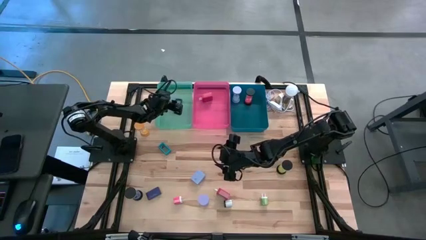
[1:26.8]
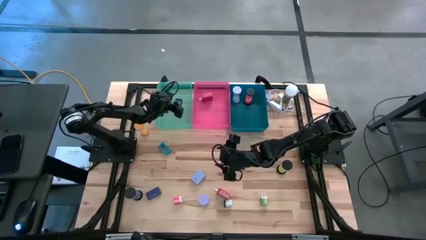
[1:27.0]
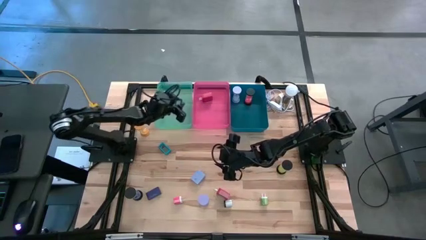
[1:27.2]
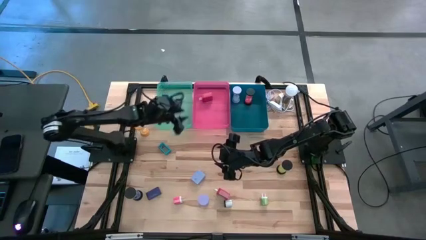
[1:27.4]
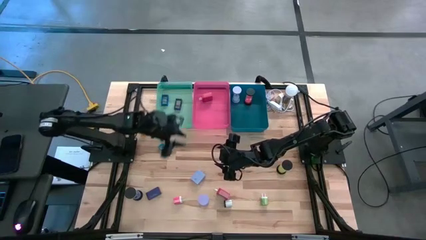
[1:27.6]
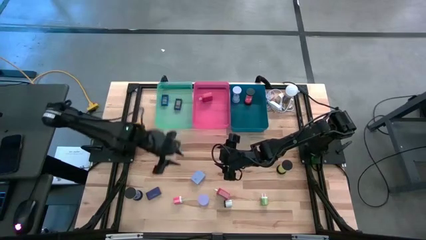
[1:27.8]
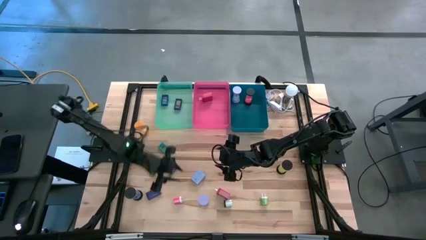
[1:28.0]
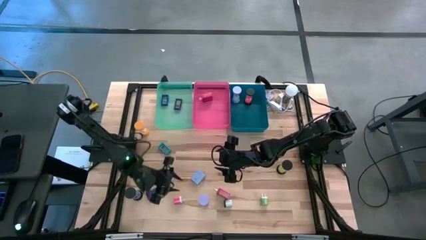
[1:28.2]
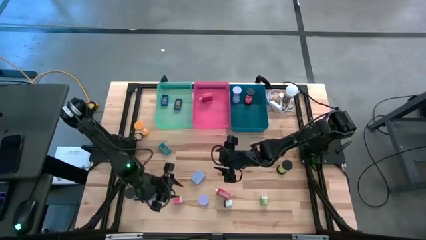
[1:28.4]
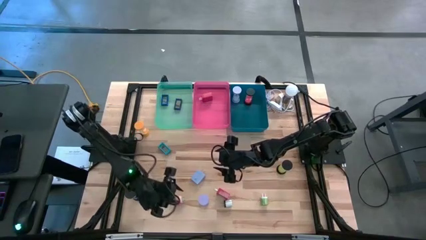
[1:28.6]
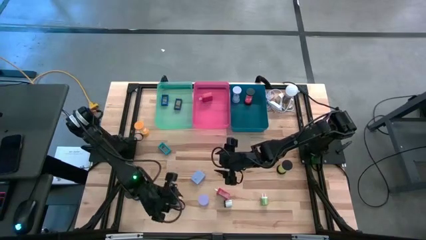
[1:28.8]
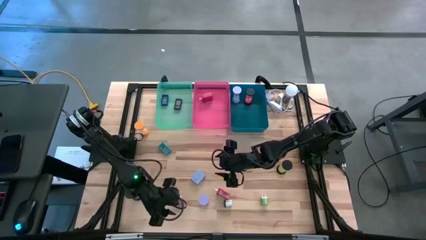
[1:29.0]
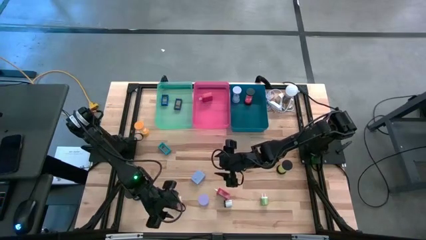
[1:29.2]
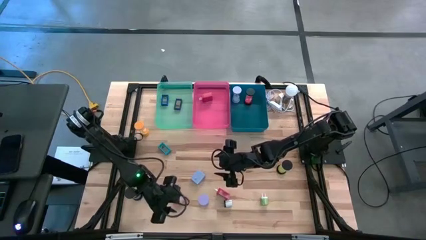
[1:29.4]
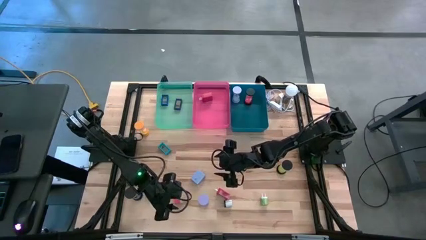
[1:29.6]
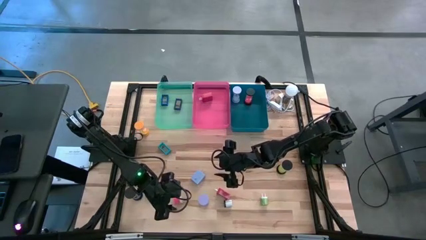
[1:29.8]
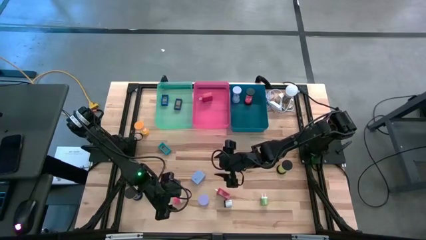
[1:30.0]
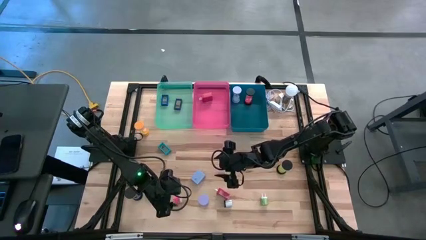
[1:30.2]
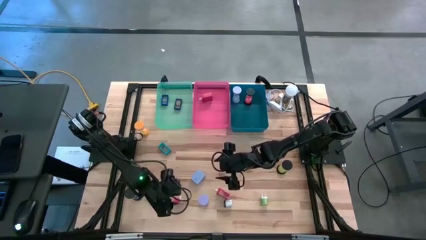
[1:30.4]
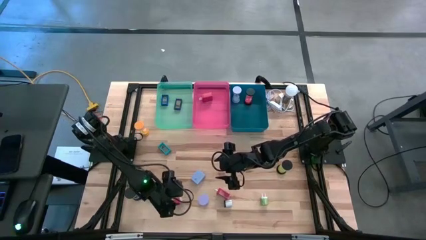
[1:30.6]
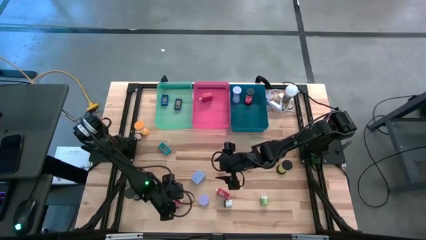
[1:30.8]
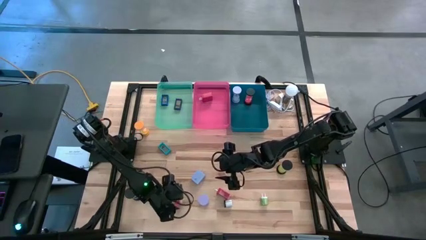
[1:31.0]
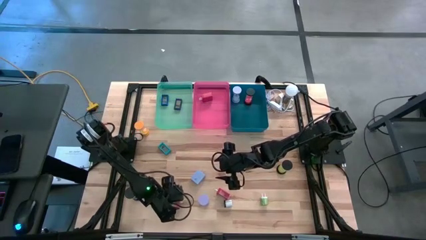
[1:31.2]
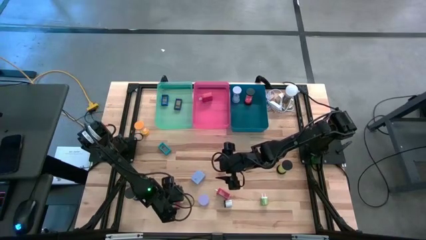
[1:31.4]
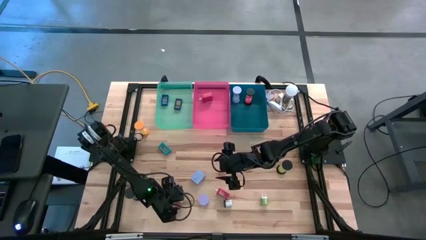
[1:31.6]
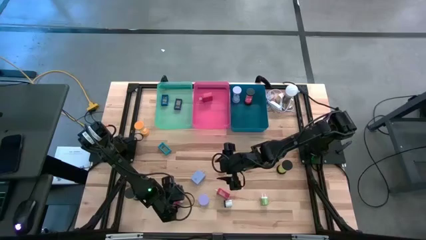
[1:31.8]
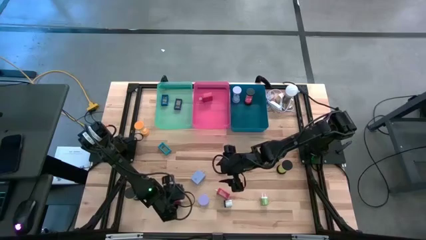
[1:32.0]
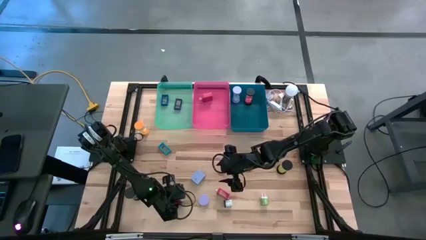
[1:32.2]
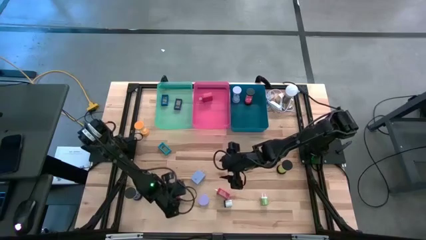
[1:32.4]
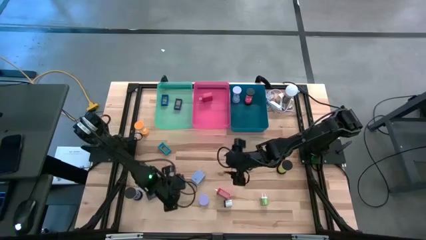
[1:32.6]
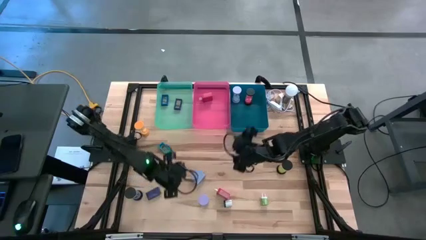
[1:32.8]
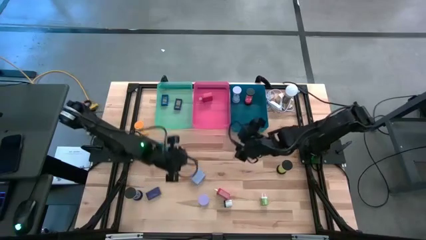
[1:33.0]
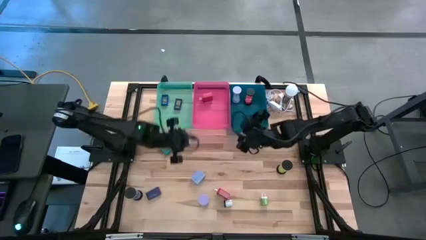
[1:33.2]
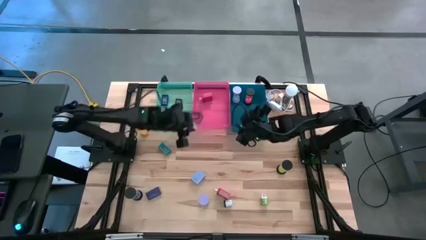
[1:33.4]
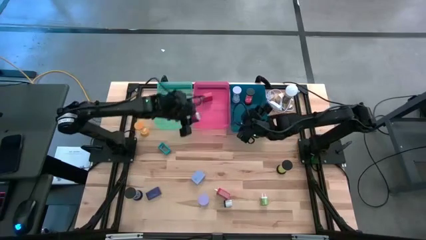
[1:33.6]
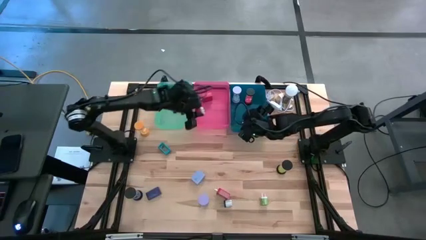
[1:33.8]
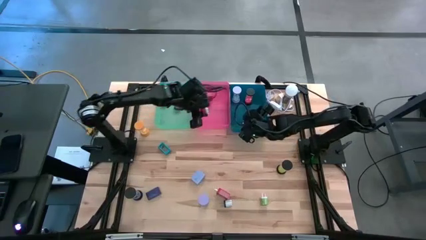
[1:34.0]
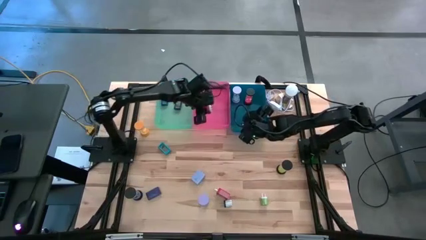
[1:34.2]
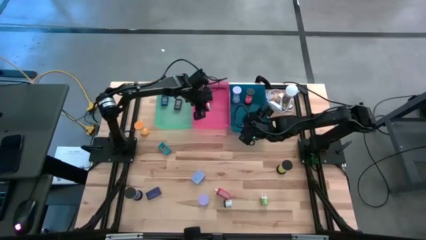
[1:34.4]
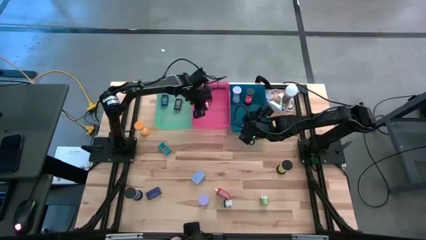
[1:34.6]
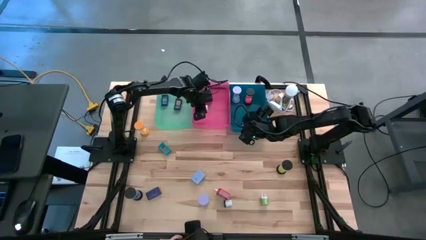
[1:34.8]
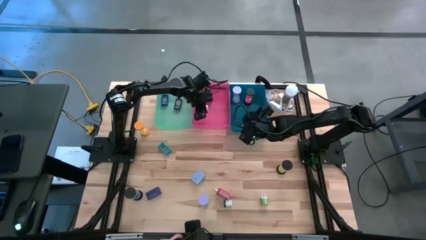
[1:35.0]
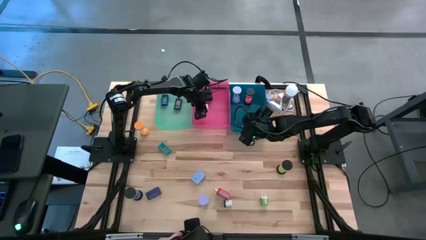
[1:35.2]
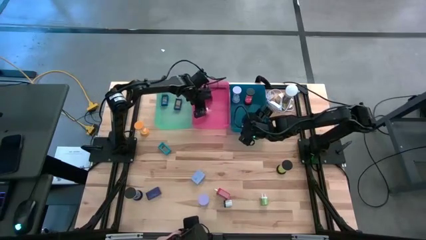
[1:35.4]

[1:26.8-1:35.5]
Task: Pick & Place Office items
Put the small pink adapter into the red bin

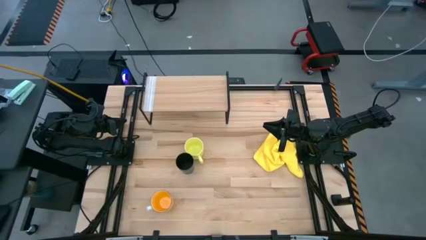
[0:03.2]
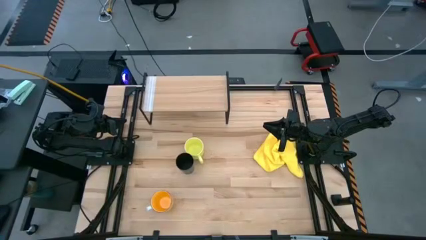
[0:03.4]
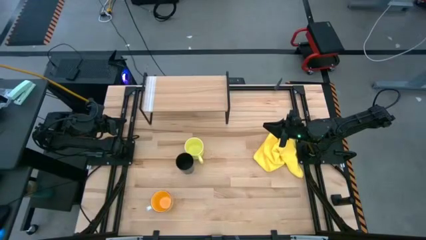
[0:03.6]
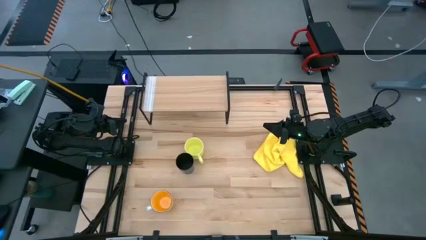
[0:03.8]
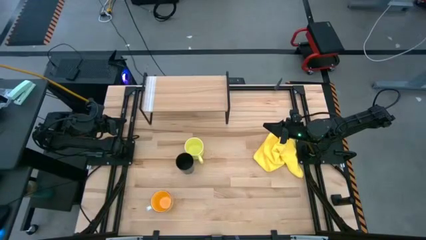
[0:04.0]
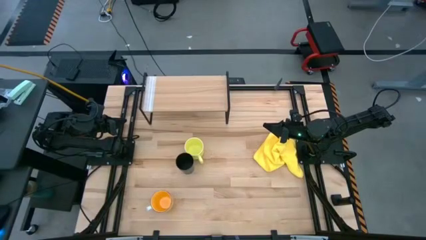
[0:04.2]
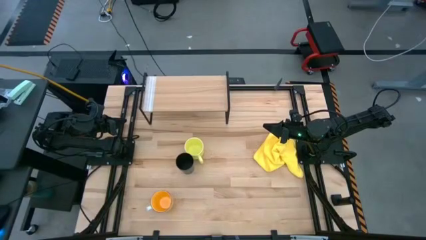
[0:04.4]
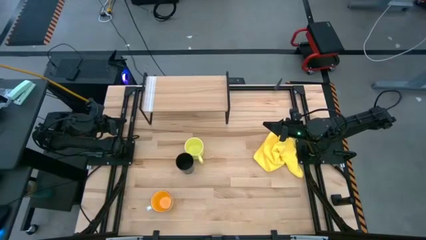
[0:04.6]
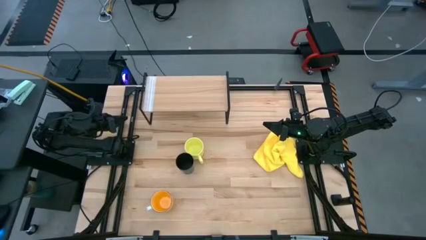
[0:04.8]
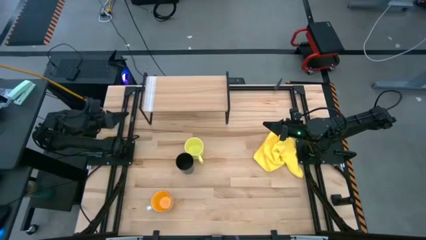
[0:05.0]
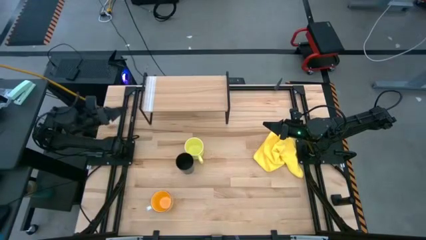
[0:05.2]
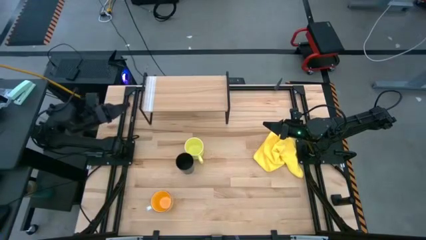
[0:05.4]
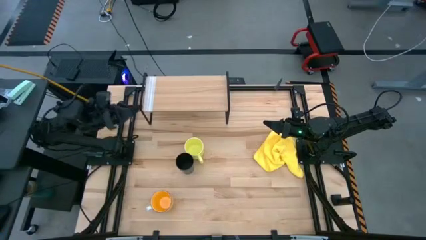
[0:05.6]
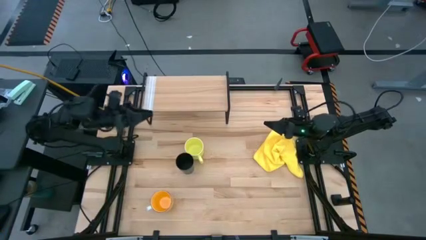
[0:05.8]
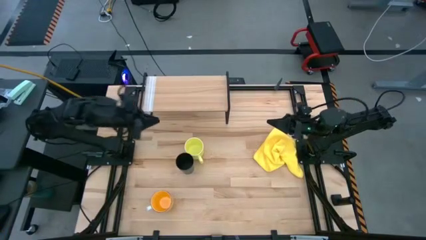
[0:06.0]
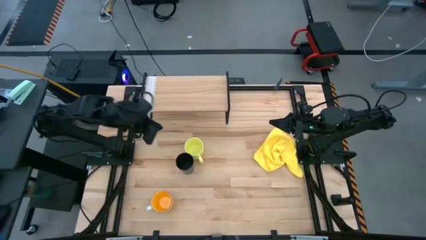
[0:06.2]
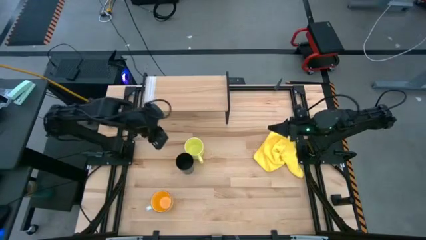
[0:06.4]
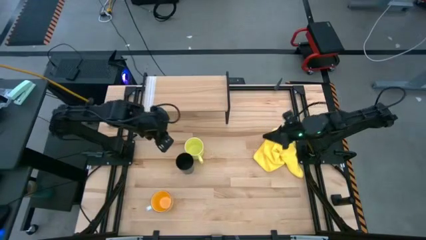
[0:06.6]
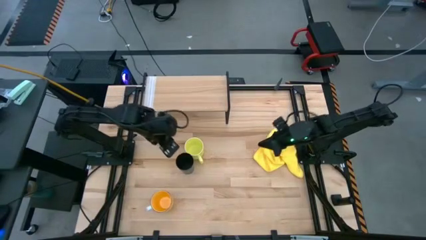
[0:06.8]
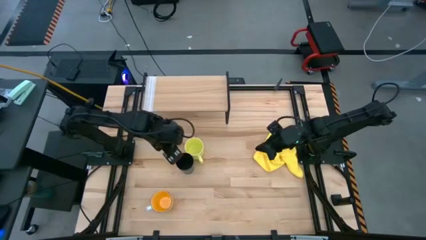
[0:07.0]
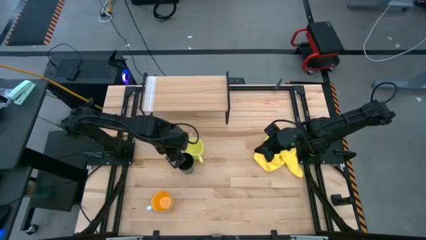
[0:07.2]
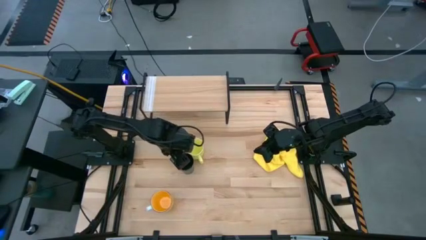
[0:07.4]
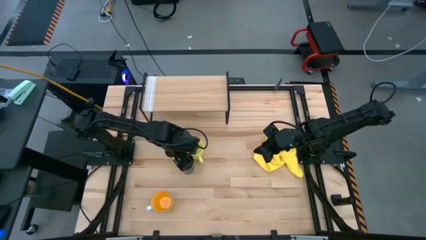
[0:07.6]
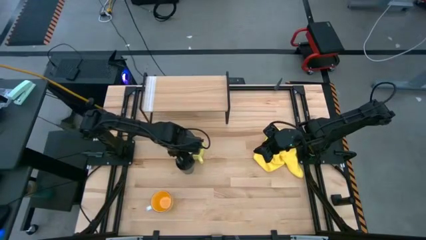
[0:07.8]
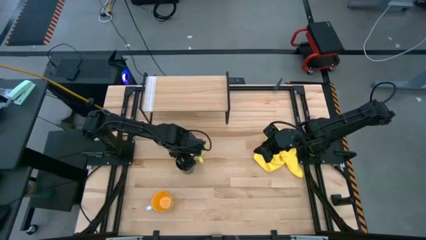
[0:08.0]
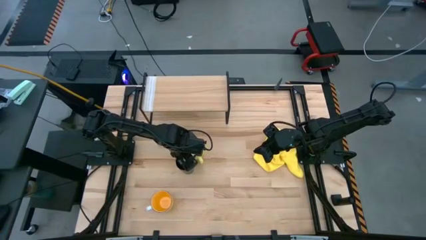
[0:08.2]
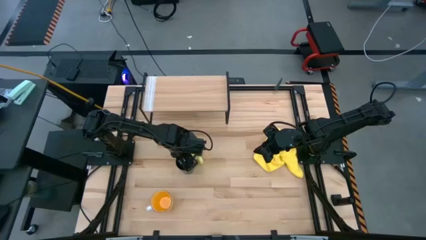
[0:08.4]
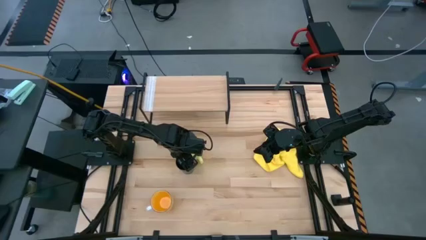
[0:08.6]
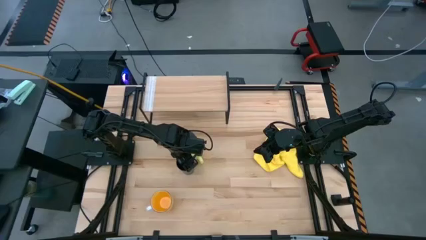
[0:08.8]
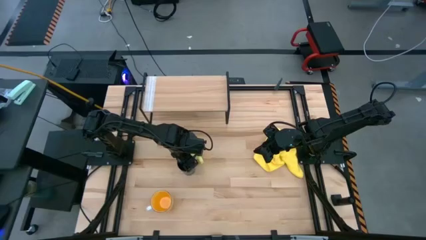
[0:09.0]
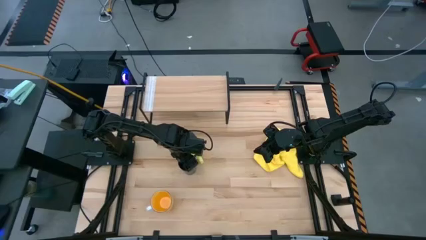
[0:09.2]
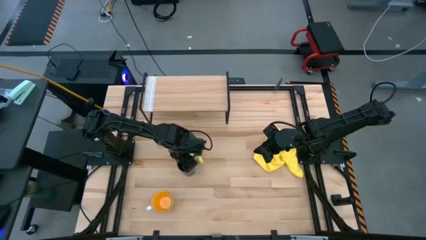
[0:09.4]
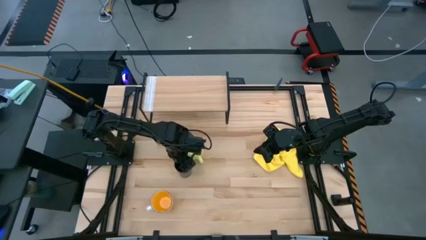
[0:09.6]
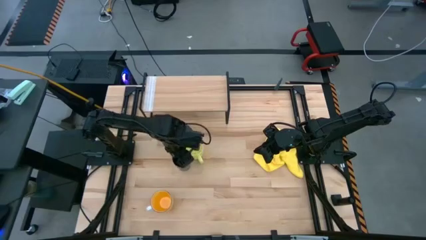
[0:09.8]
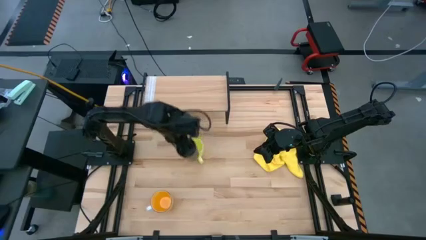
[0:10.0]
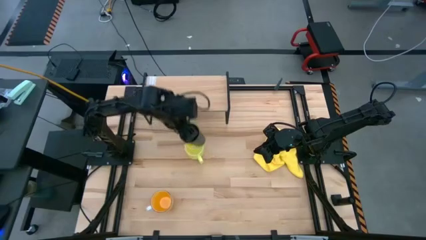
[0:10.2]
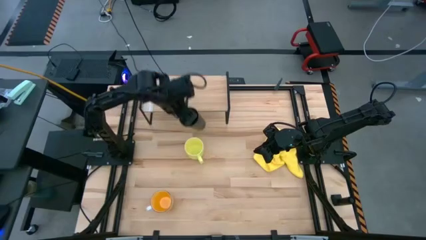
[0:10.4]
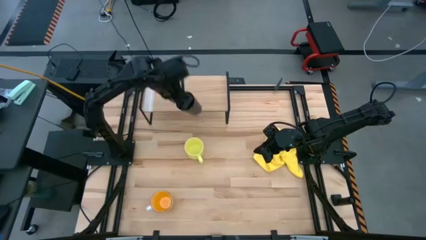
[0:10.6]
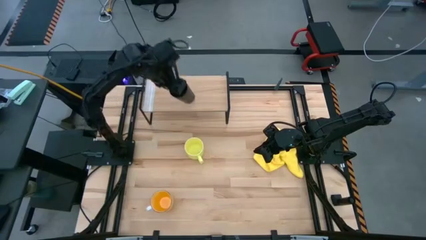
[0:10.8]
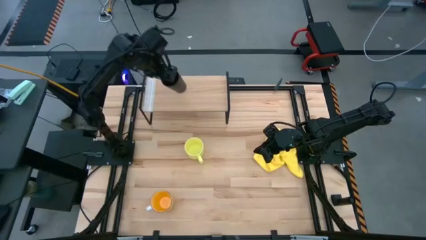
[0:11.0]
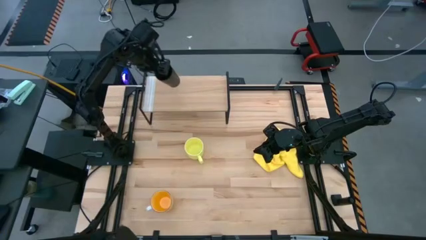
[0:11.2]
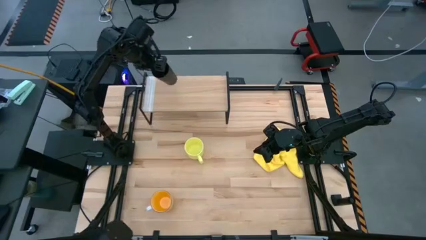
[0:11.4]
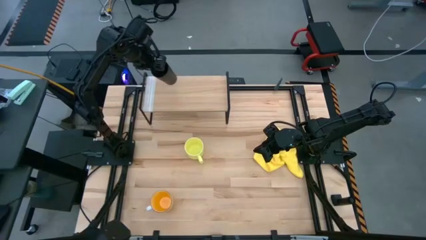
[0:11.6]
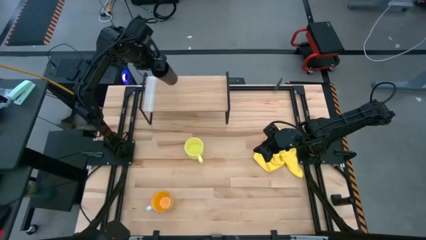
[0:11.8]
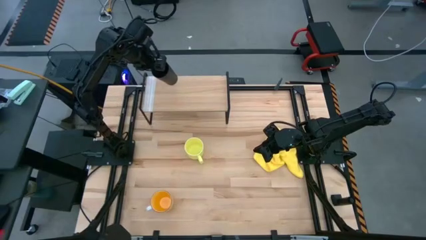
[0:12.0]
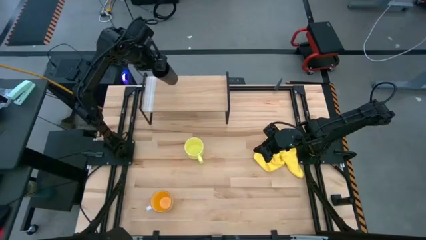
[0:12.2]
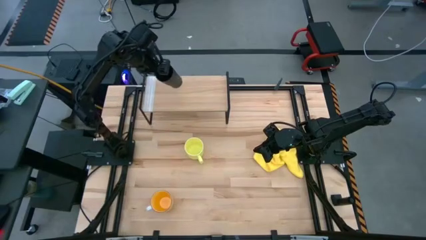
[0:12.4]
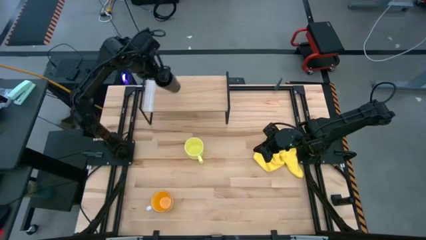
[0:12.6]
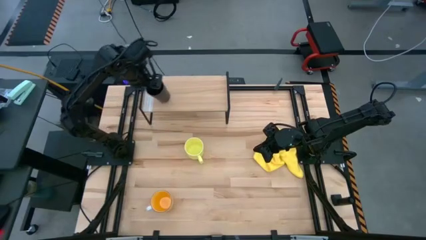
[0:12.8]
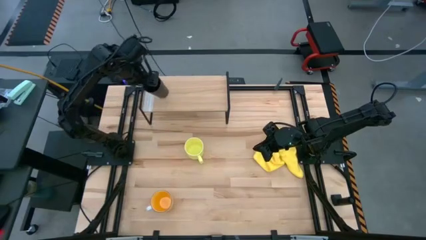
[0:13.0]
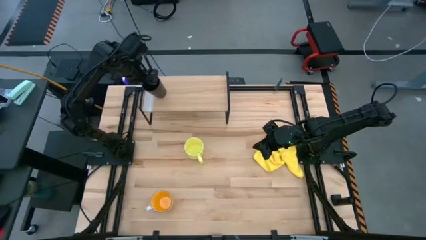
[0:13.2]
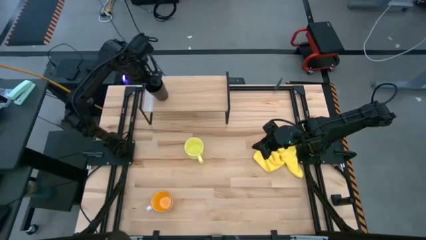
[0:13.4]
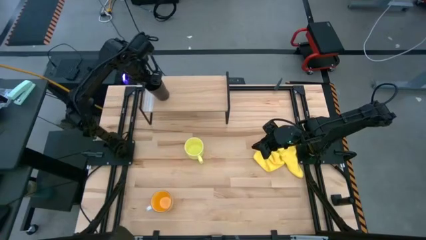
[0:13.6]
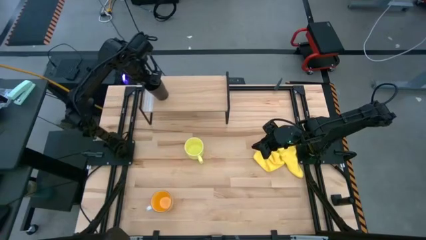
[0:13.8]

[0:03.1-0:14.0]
Task: Stack small to large cups/mugs on shelf
Put the black cup on the shelf
